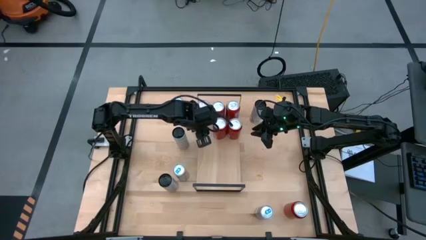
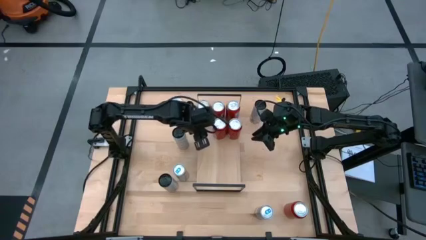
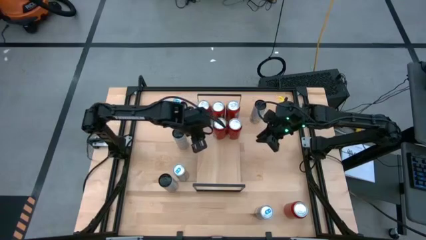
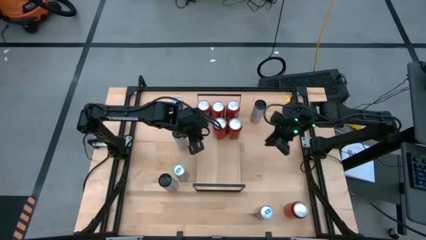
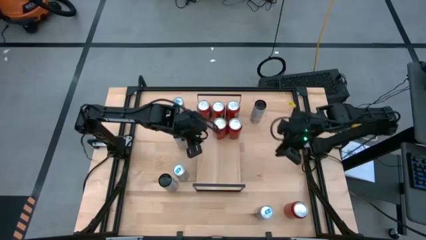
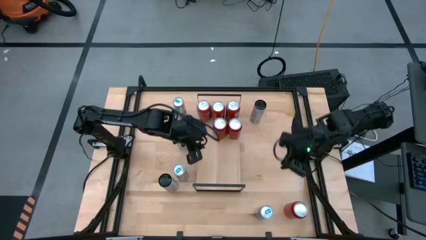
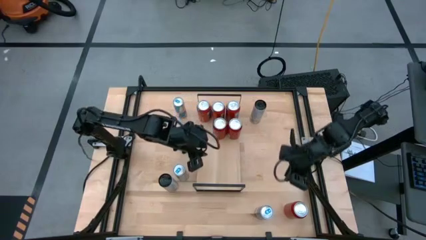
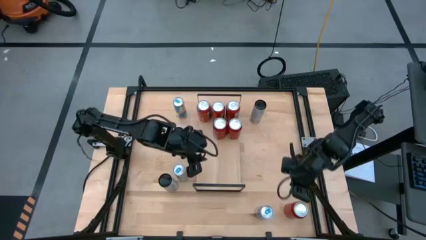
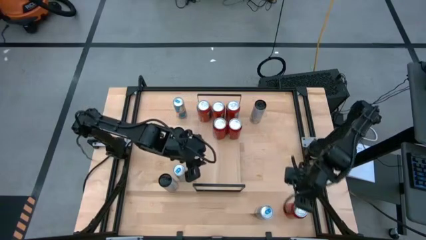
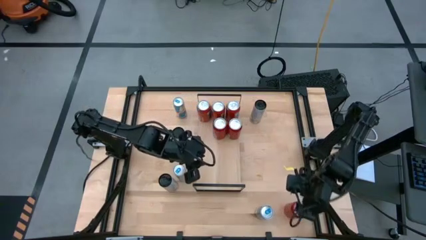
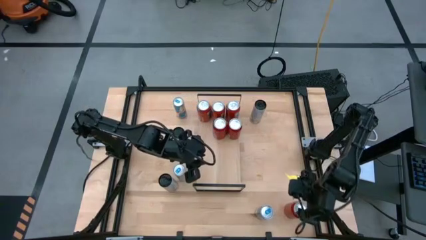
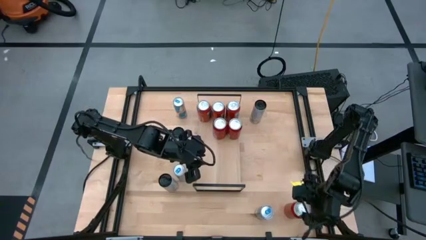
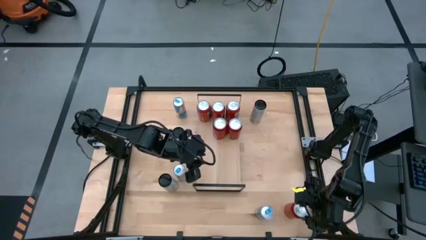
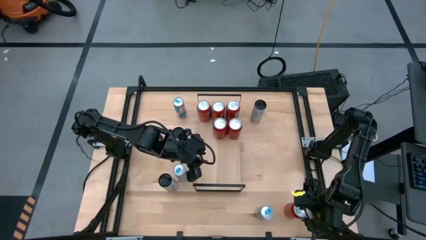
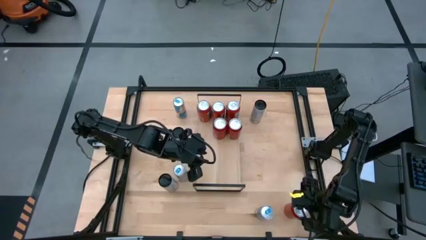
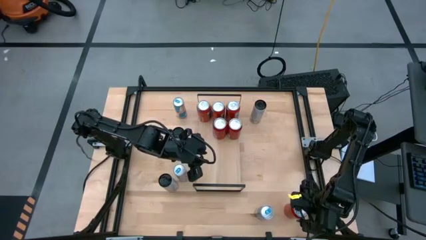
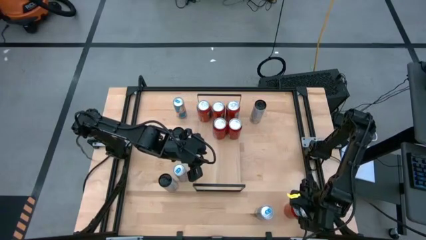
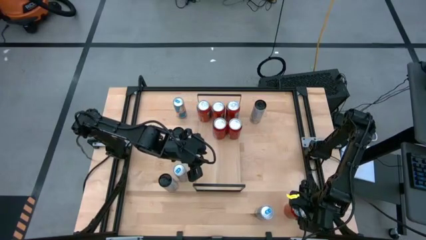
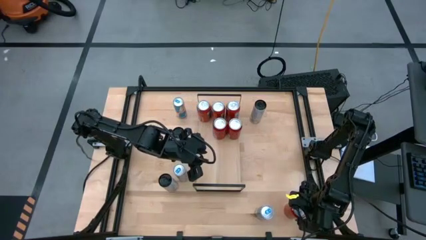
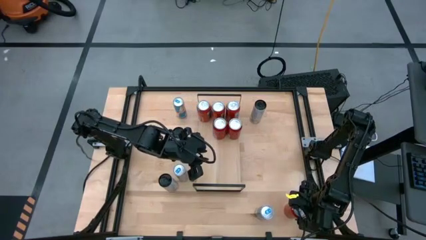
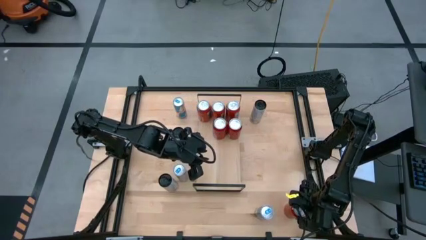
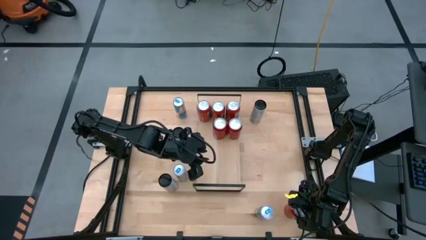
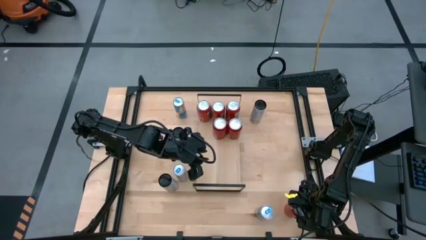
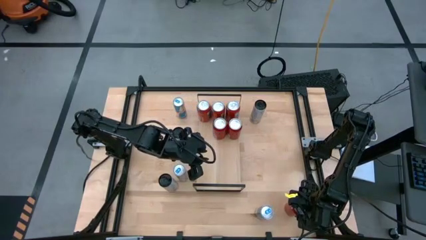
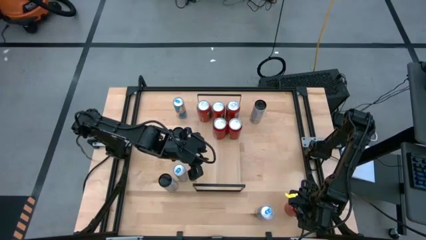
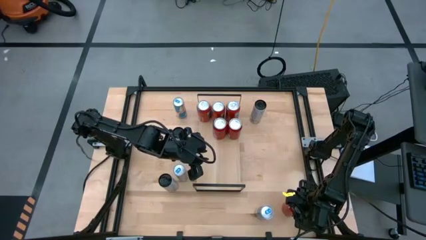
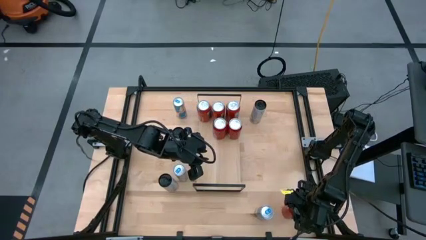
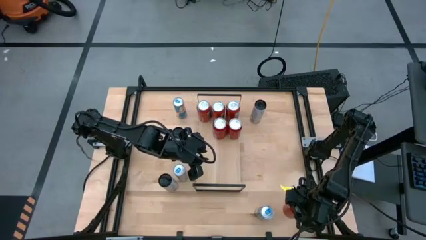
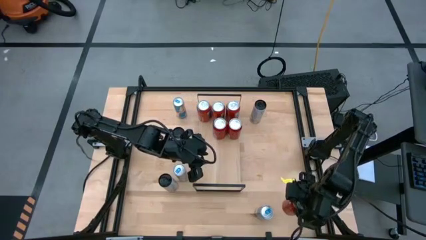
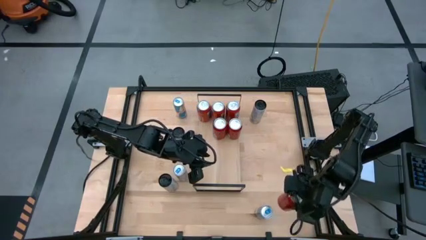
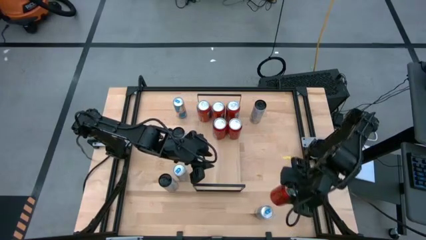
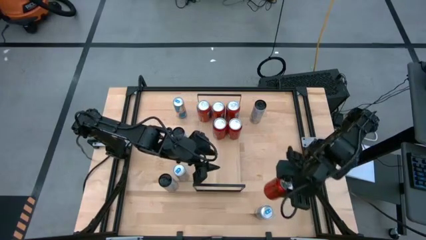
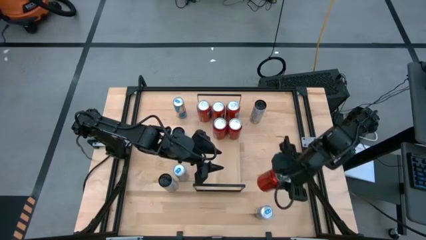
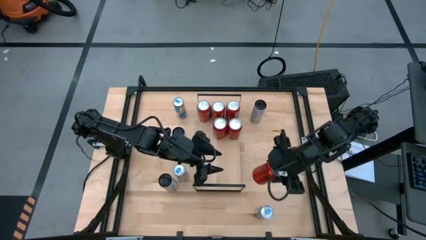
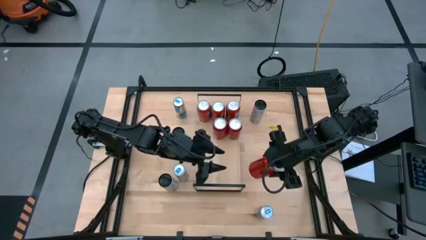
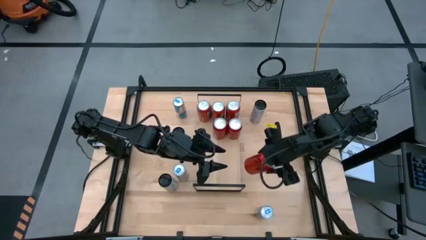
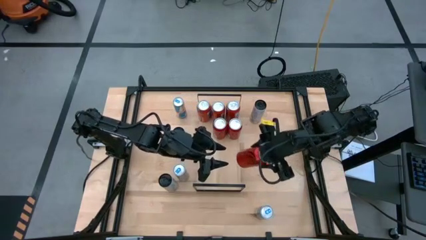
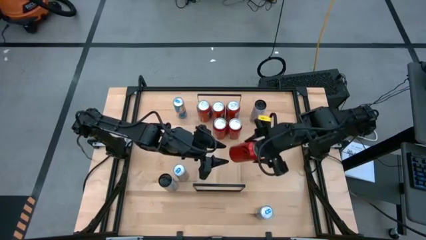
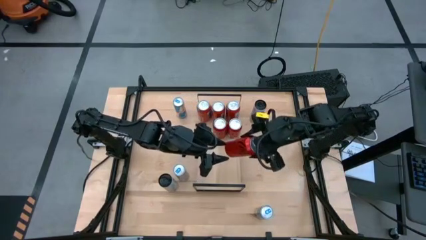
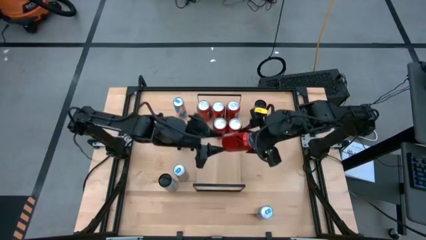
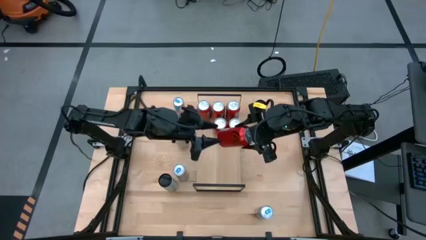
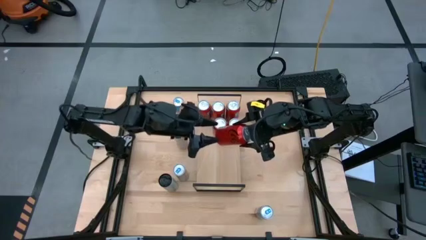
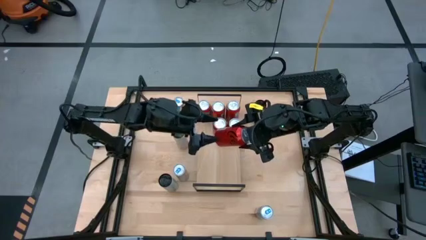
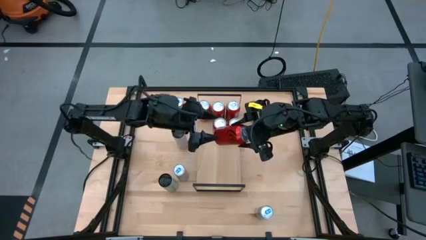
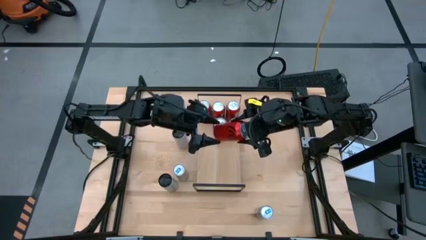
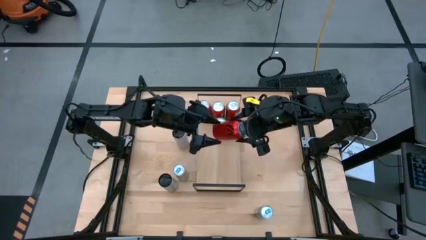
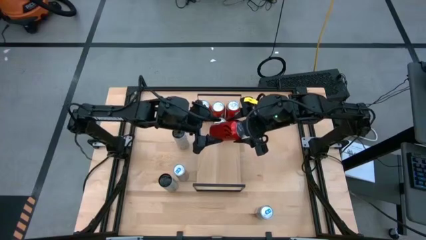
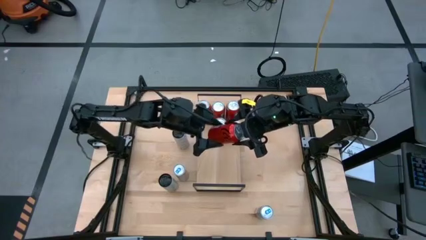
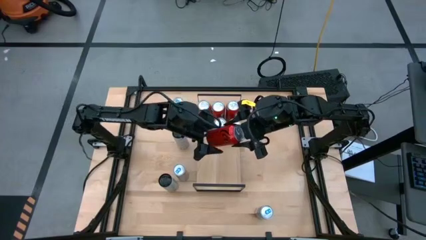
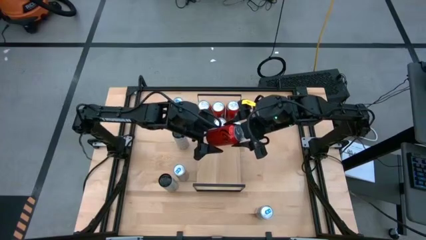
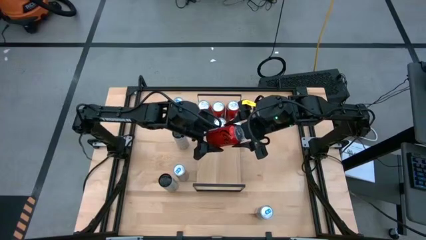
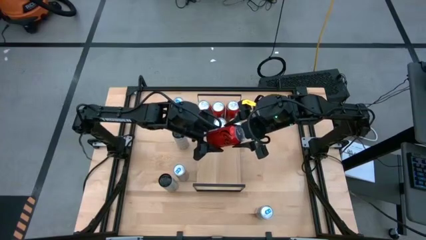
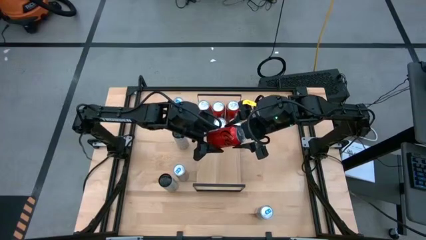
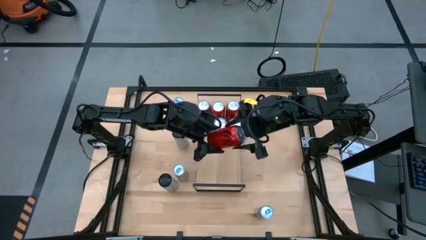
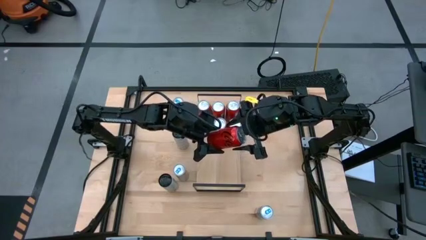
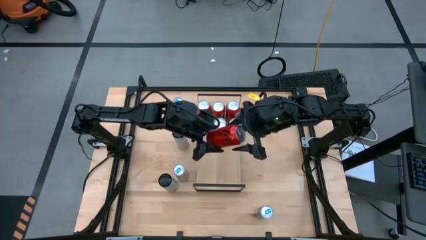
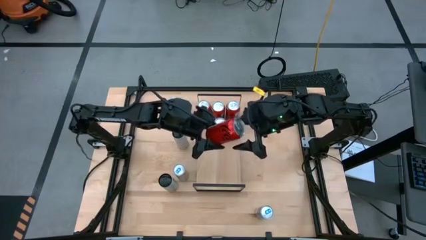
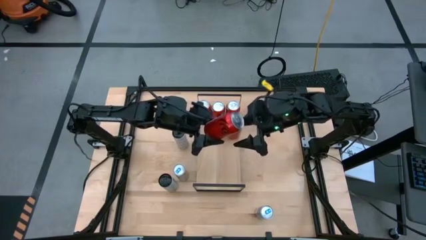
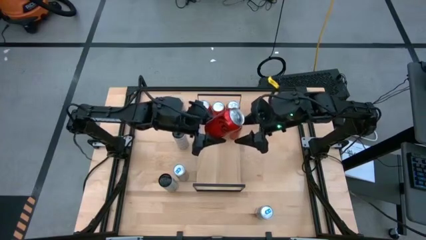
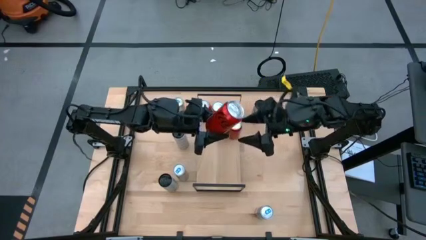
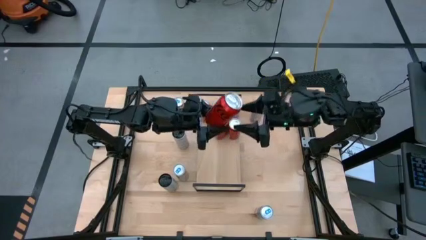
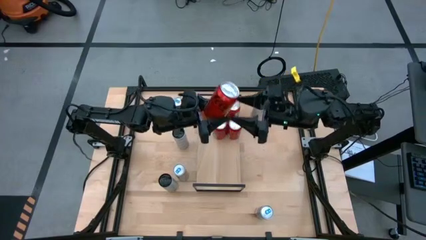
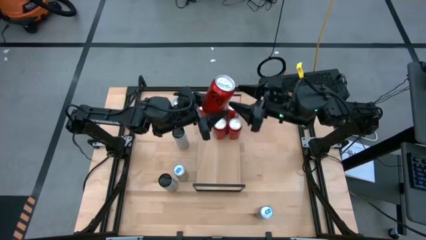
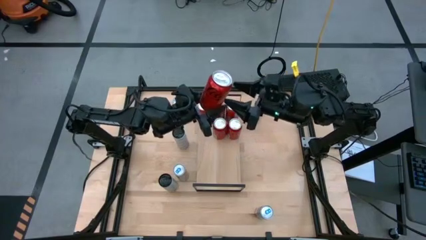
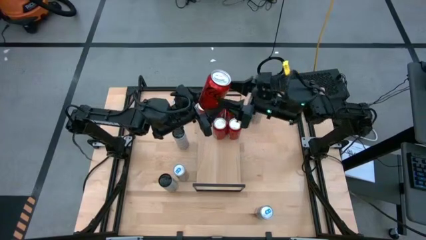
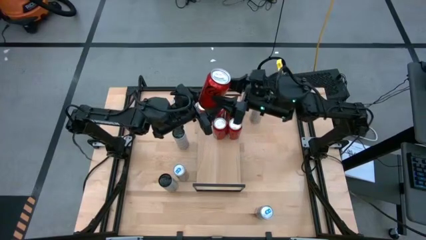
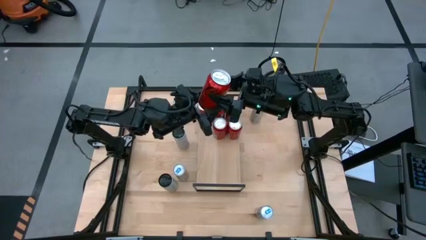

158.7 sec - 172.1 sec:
Task: Place canned beverage on shelf
Put the red soda can on the shelf aligned with the other red soda can

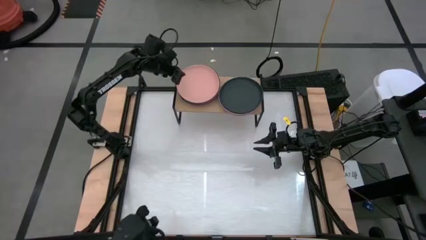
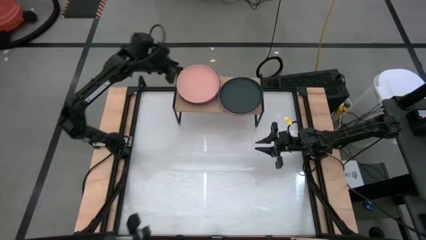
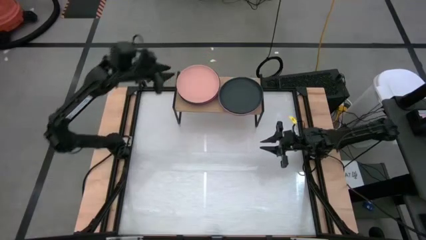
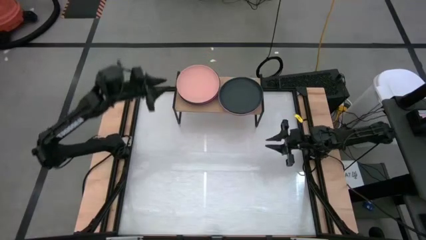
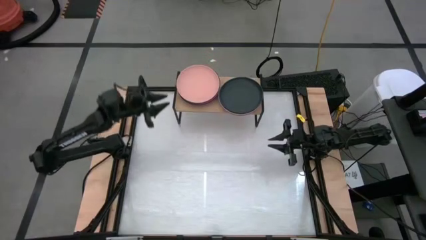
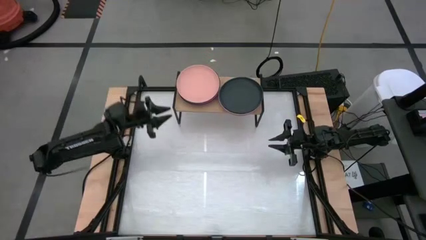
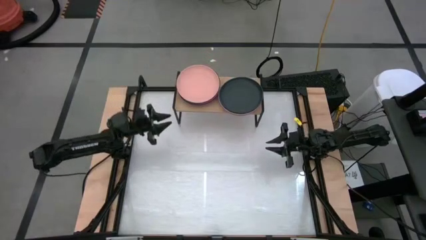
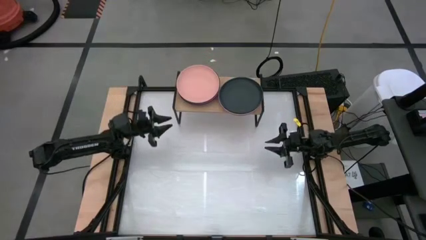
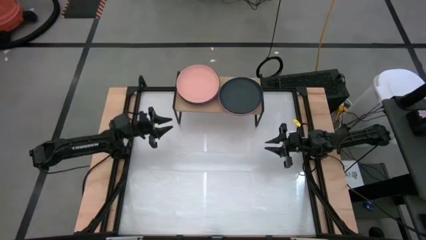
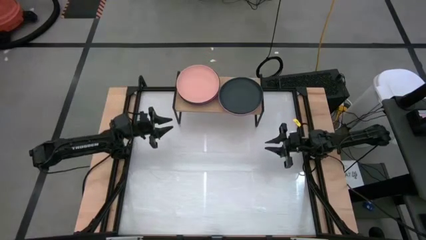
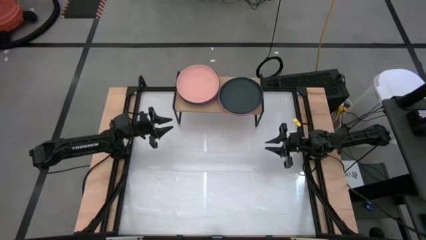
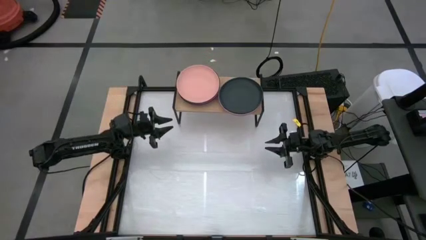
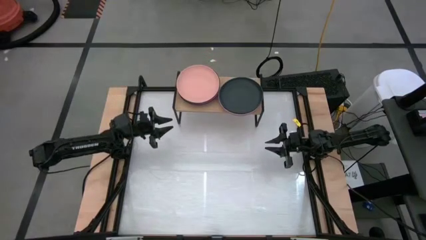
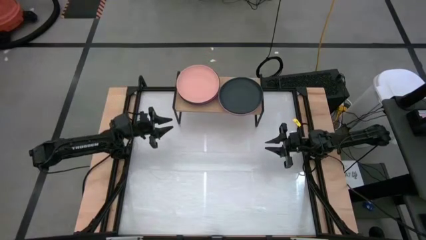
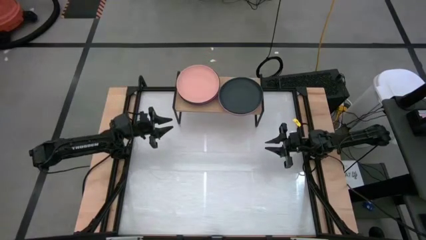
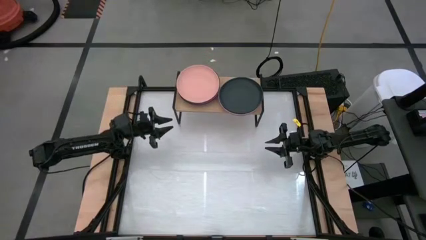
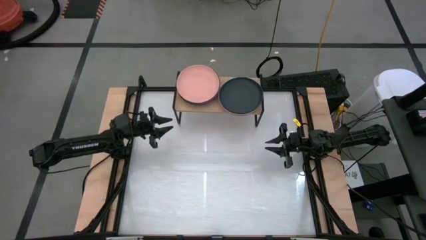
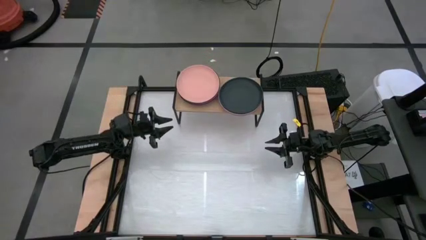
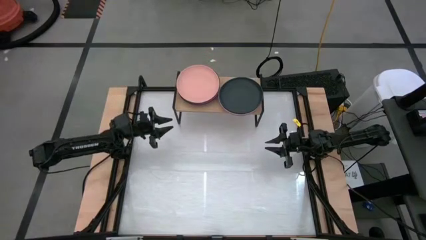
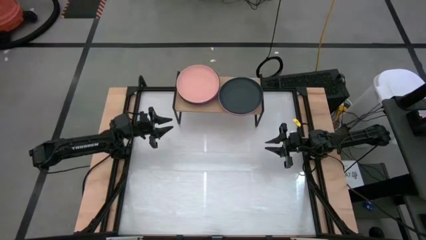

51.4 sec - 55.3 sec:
Task: Place and stack plates onto a shelf
Return to Home Position
